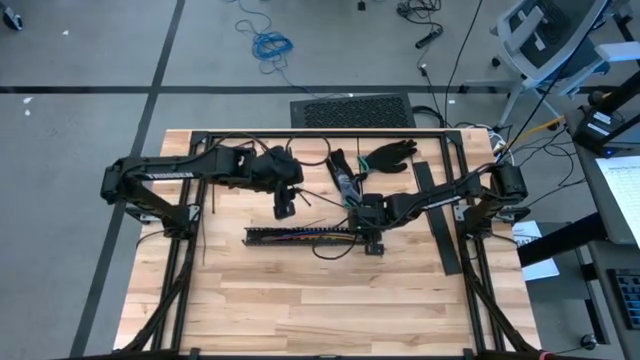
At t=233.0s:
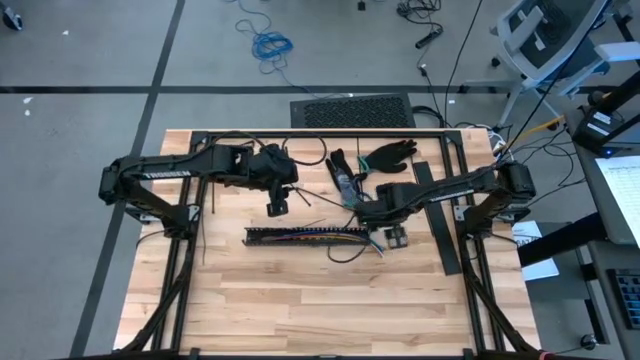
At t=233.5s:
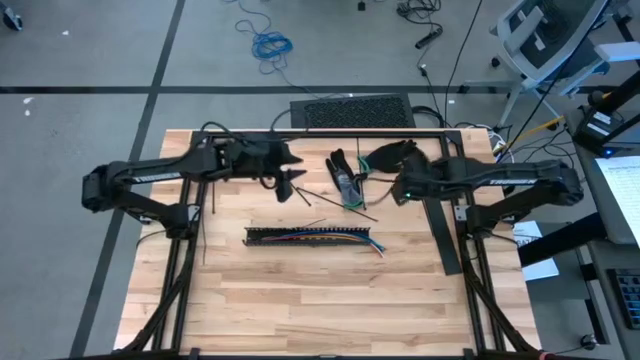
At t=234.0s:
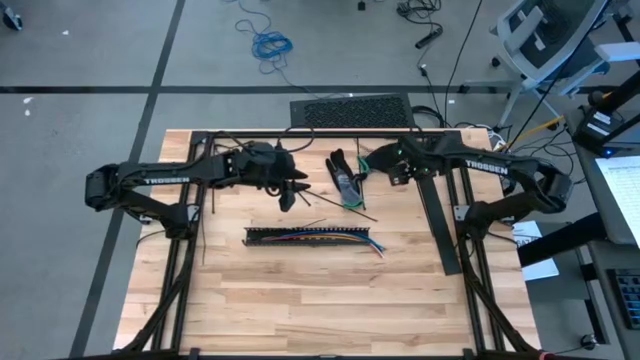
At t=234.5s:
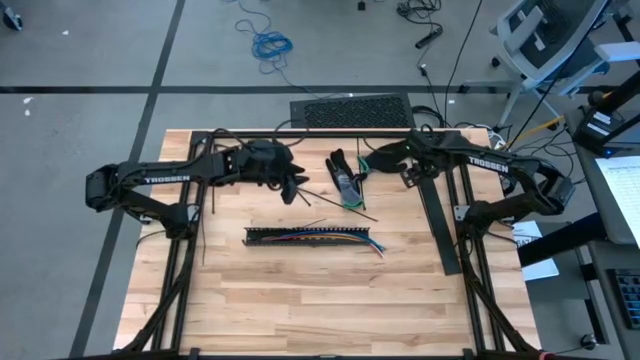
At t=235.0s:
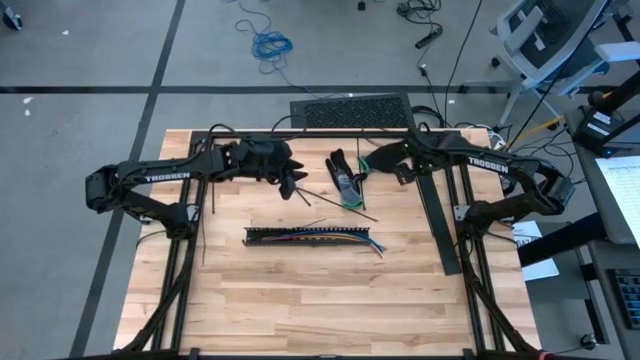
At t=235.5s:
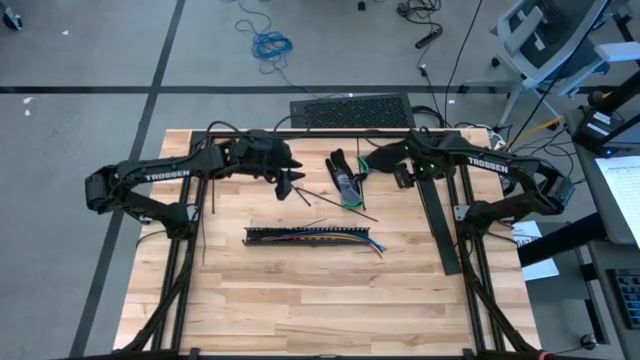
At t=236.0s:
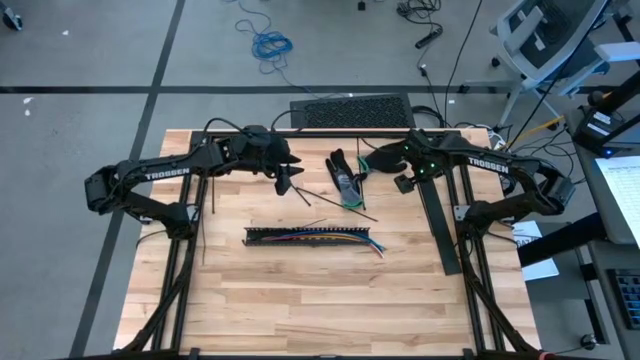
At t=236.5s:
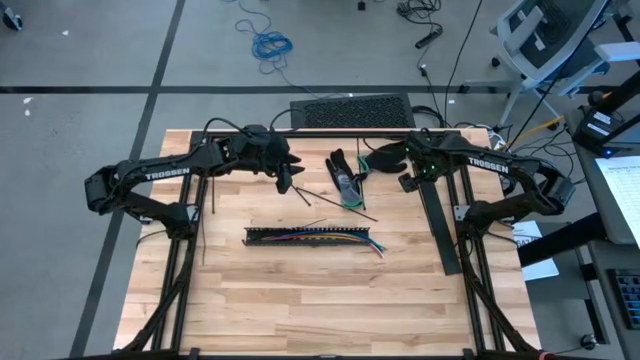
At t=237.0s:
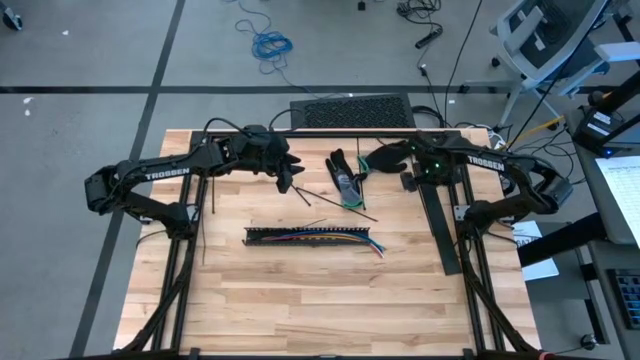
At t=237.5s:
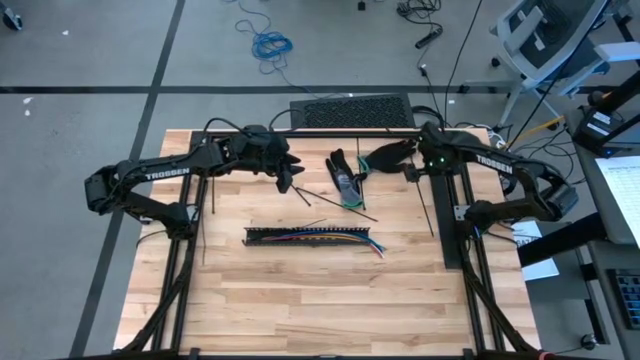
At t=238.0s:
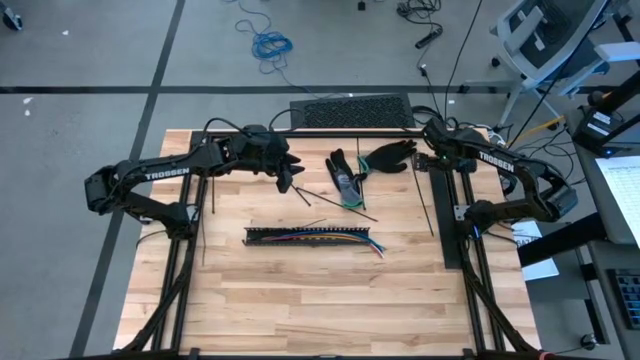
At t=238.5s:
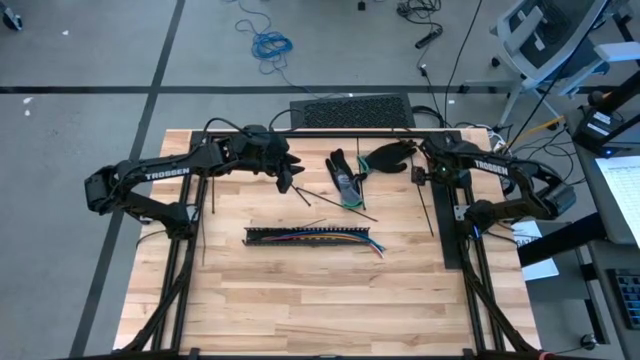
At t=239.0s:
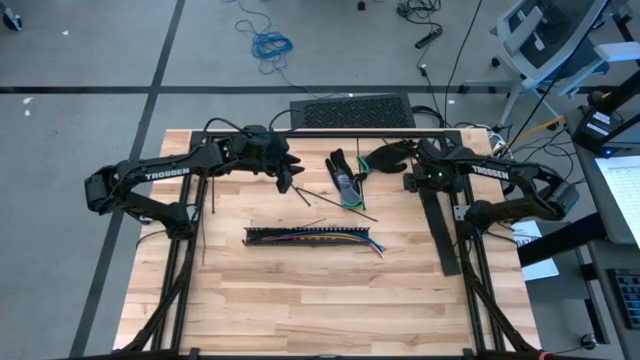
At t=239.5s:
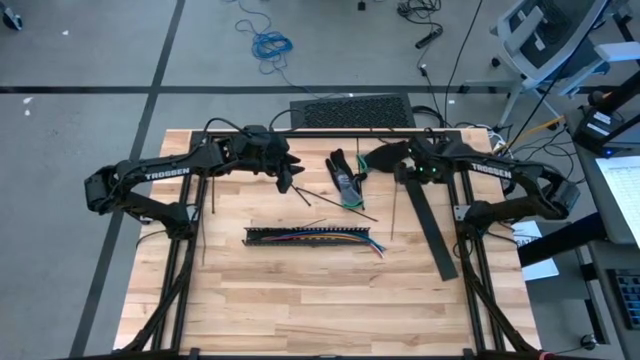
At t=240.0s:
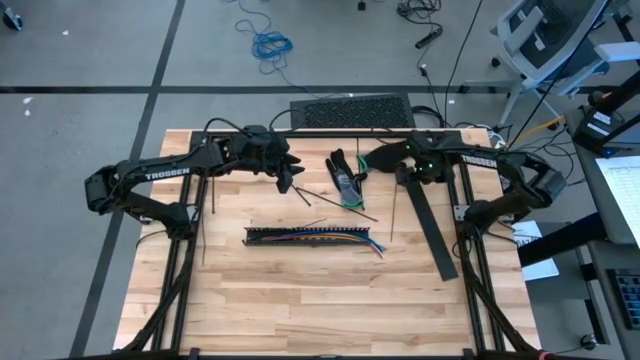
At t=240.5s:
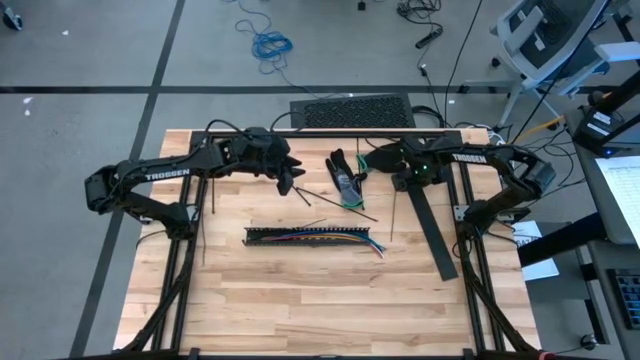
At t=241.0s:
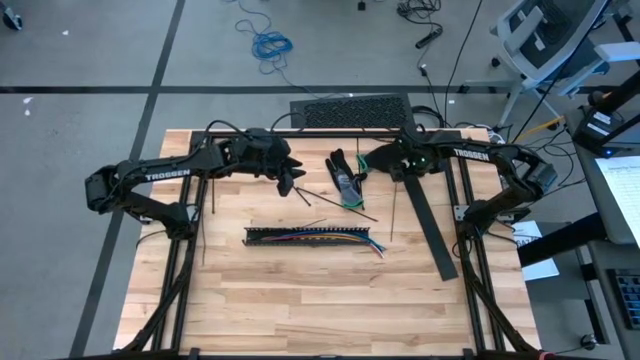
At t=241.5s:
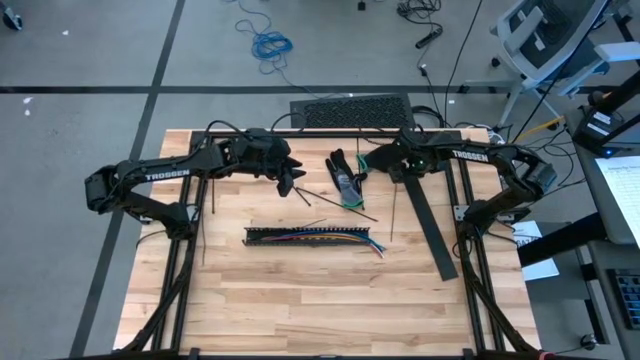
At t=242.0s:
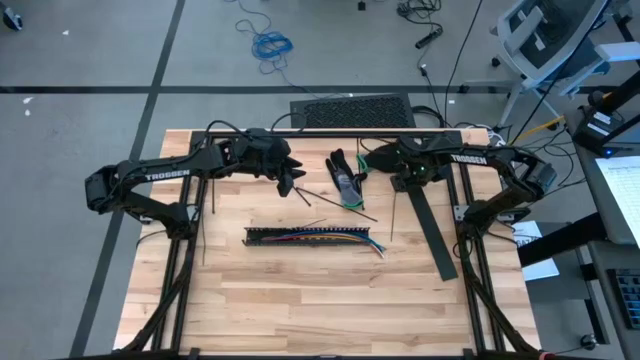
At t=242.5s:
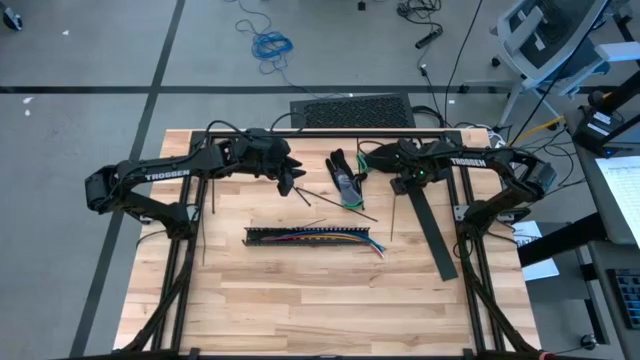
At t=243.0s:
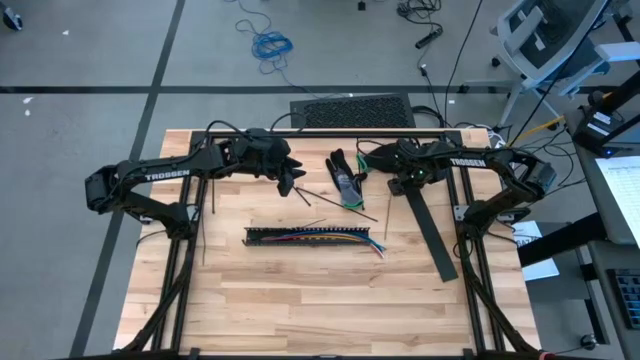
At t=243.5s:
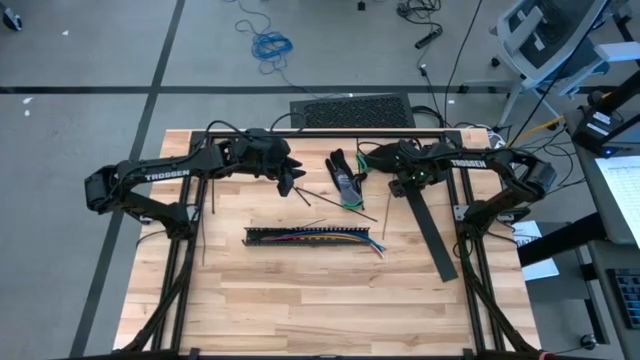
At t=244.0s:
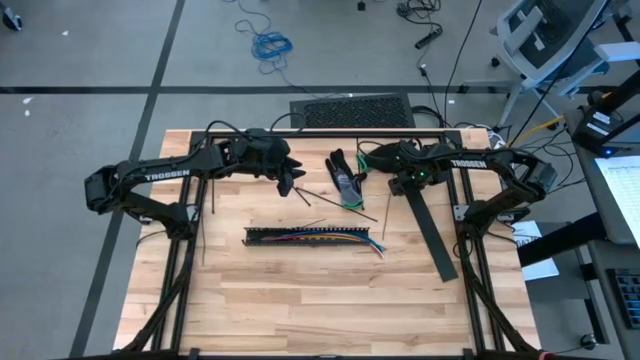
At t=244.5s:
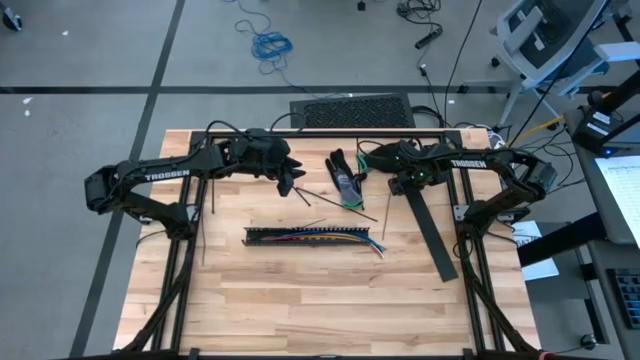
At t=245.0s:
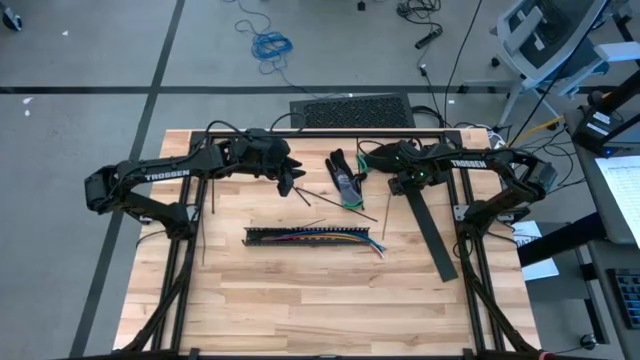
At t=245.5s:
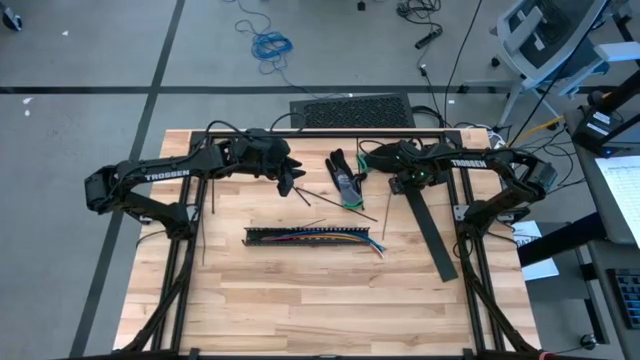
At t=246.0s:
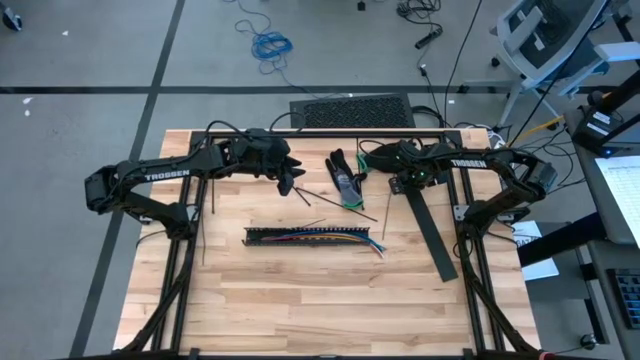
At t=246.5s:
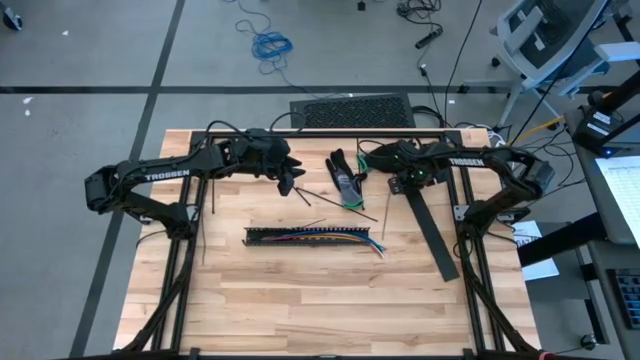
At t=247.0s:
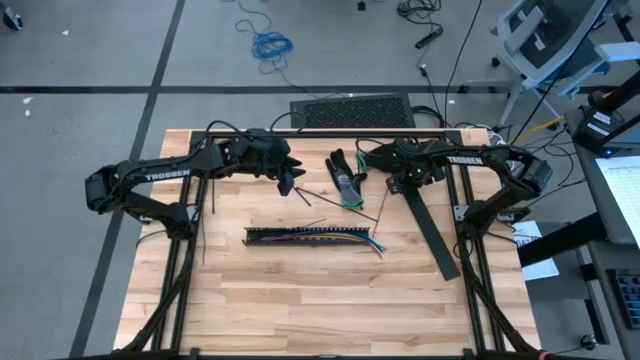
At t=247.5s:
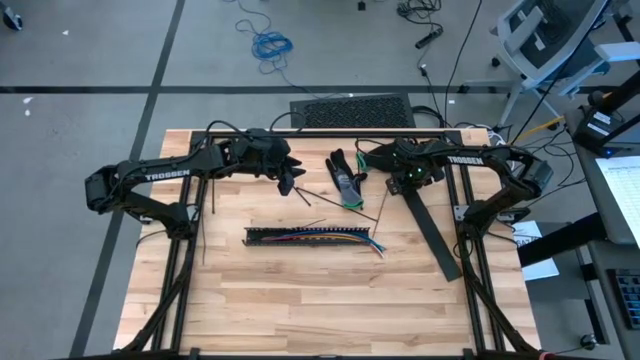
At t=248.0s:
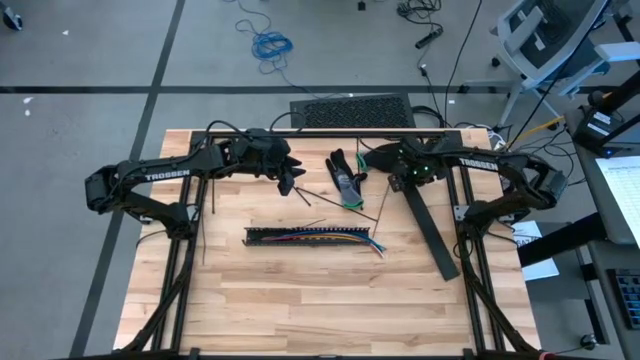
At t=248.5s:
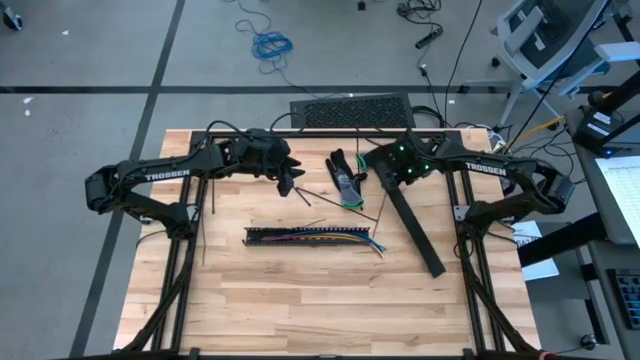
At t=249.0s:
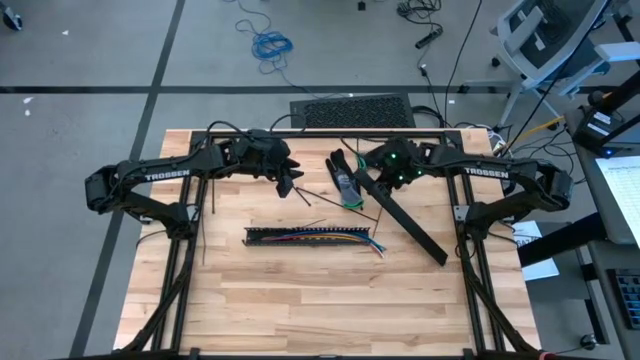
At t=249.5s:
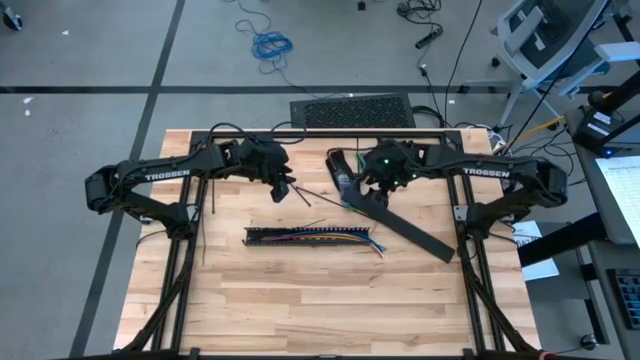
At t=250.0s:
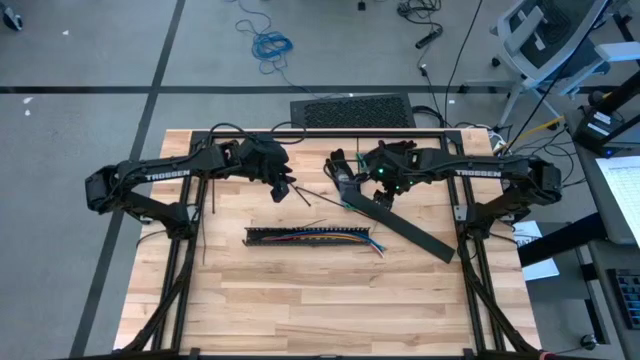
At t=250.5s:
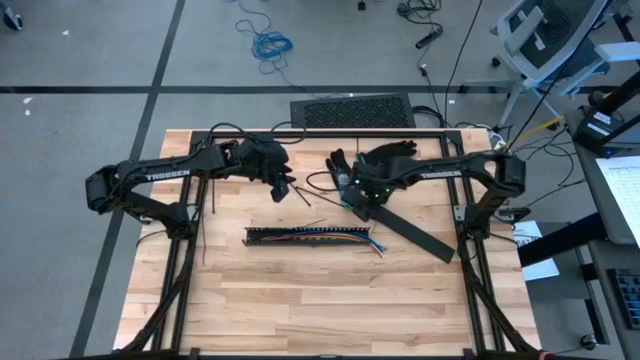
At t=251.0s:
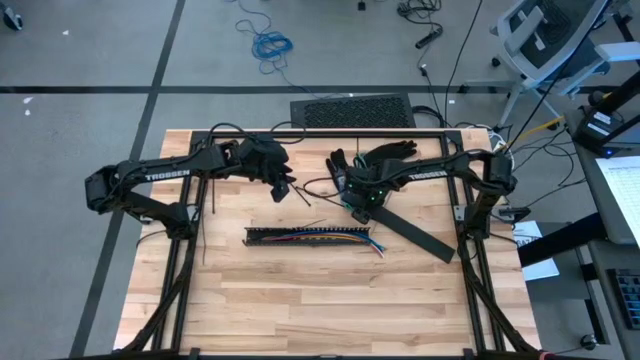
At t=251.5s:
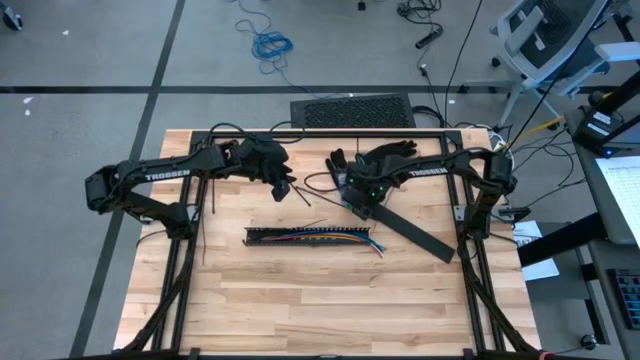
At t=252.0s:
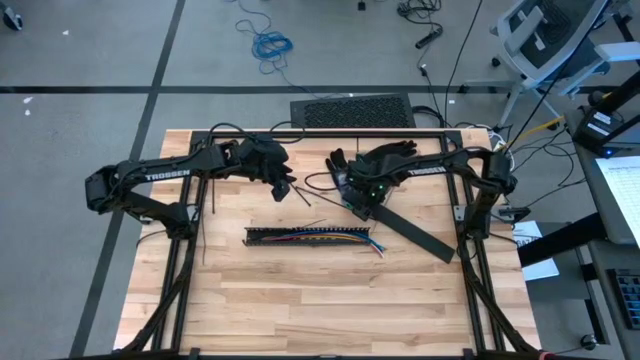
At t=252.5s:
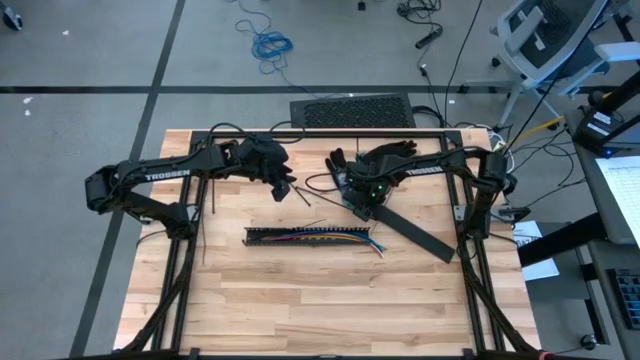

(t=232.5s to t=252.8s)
Task: Ziptie cables
Close the black cable duct
